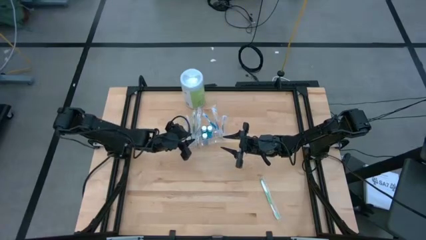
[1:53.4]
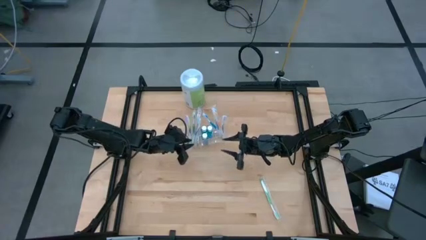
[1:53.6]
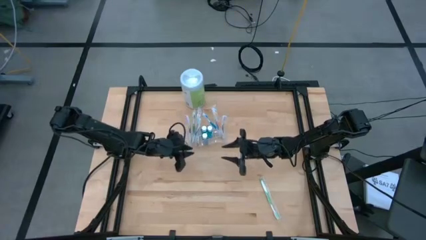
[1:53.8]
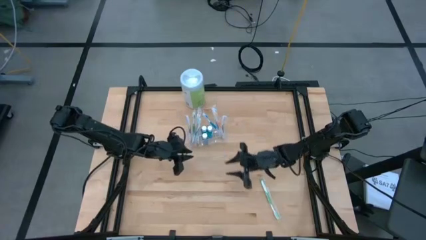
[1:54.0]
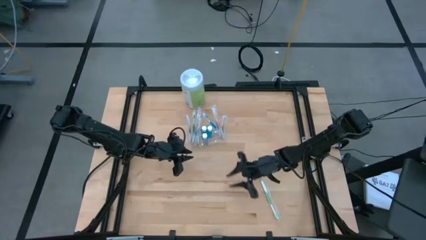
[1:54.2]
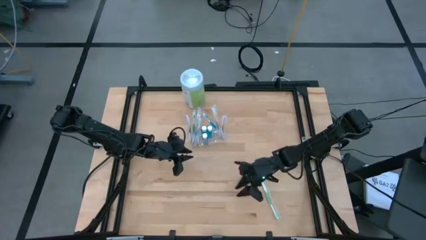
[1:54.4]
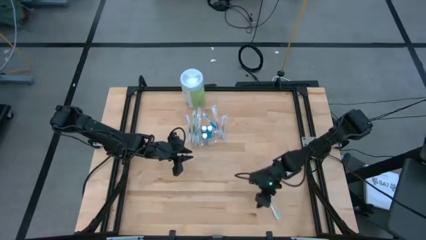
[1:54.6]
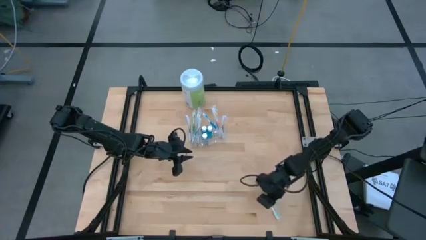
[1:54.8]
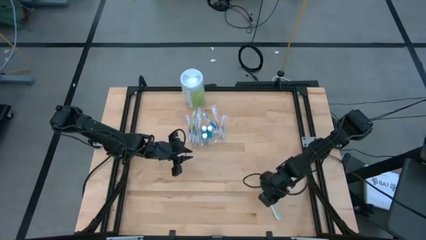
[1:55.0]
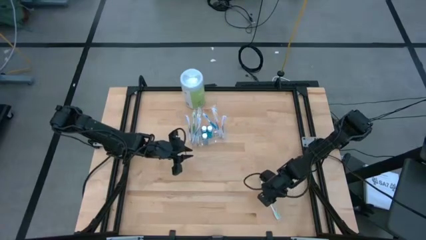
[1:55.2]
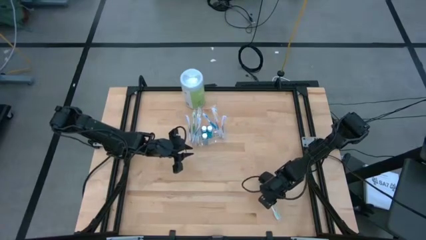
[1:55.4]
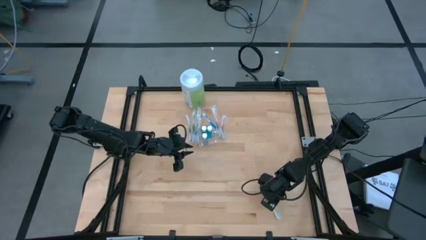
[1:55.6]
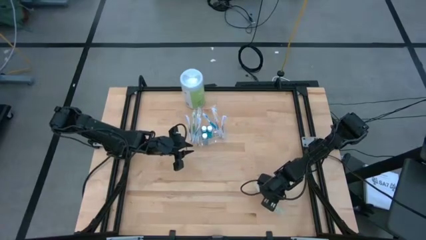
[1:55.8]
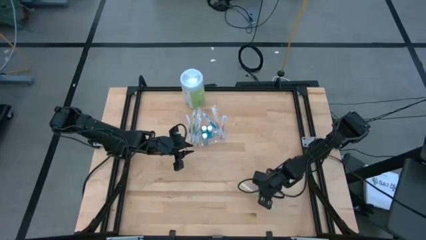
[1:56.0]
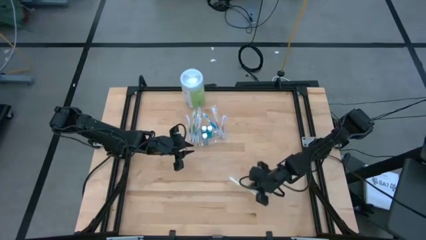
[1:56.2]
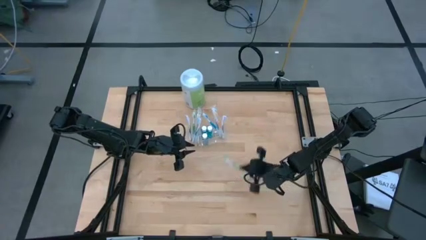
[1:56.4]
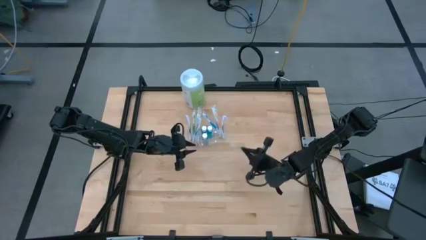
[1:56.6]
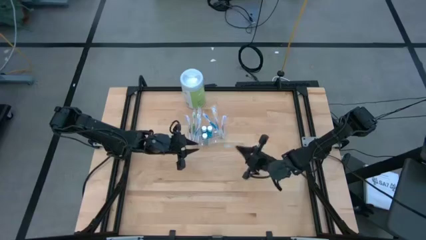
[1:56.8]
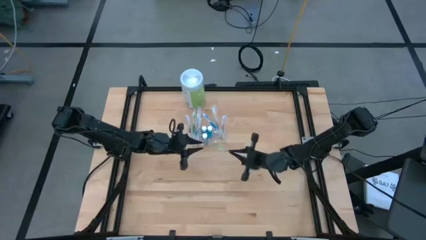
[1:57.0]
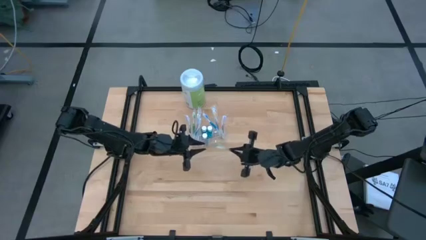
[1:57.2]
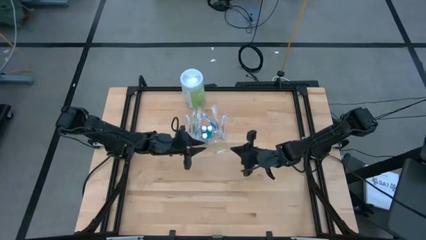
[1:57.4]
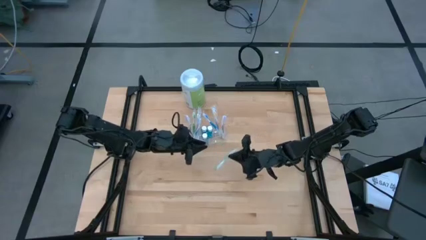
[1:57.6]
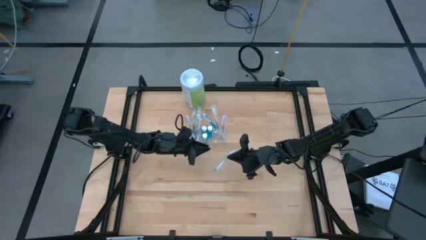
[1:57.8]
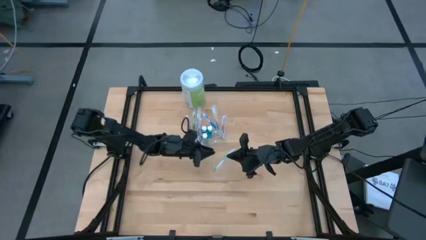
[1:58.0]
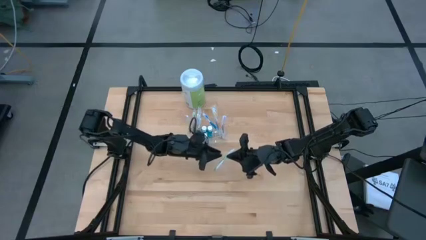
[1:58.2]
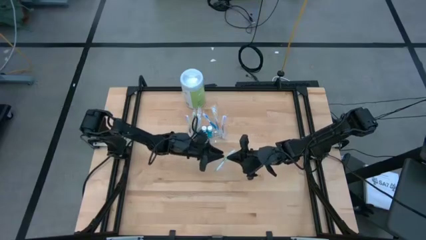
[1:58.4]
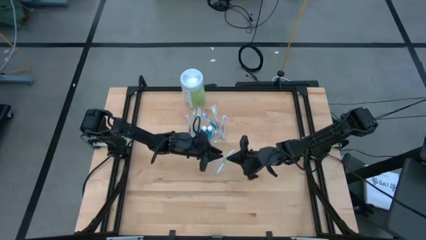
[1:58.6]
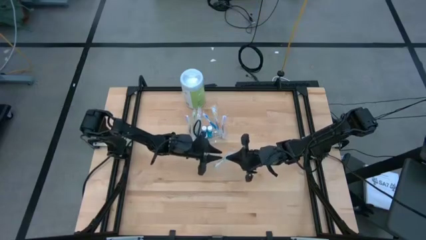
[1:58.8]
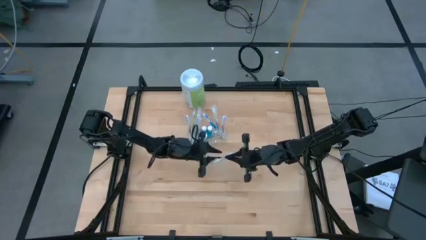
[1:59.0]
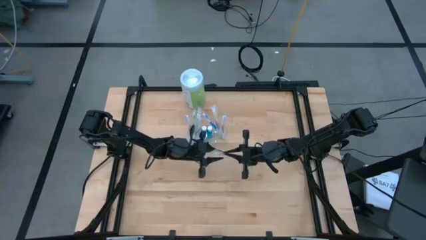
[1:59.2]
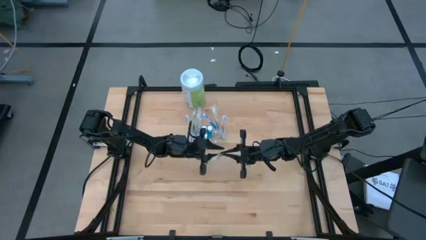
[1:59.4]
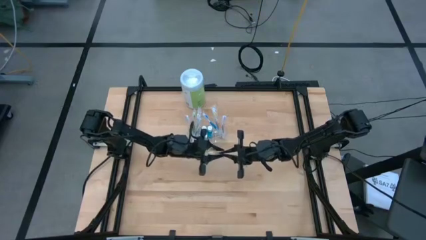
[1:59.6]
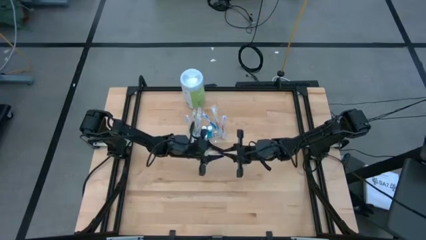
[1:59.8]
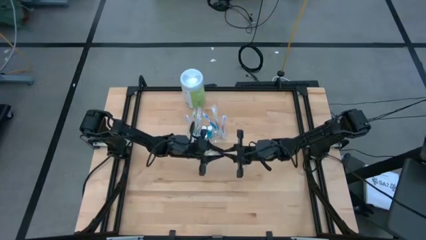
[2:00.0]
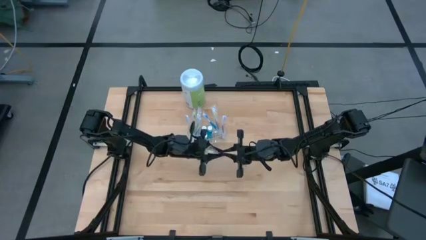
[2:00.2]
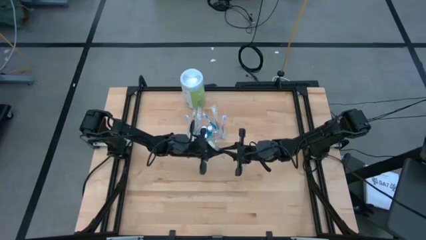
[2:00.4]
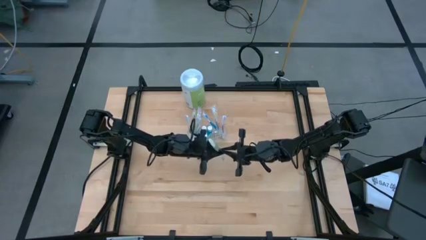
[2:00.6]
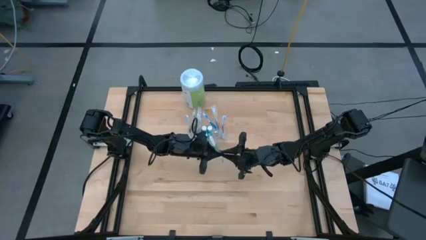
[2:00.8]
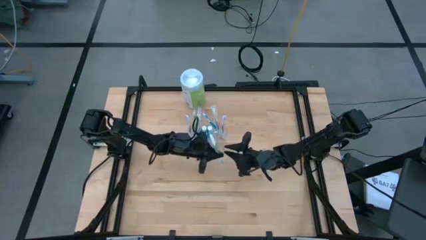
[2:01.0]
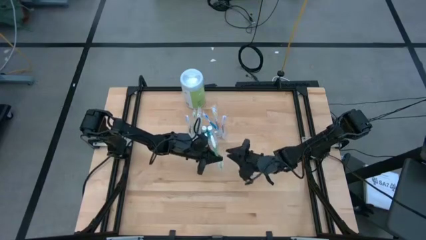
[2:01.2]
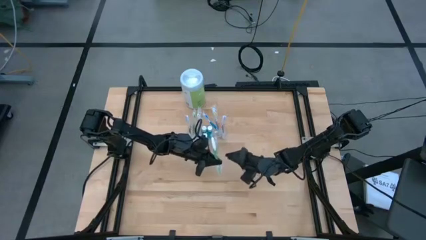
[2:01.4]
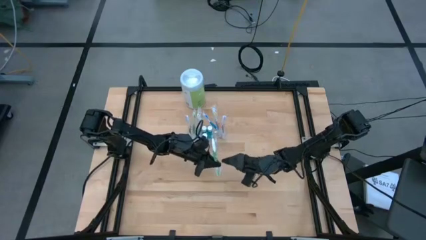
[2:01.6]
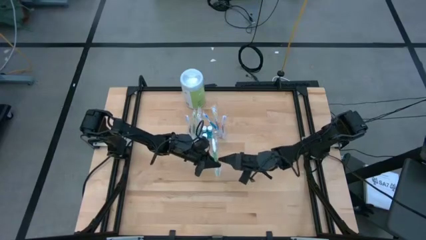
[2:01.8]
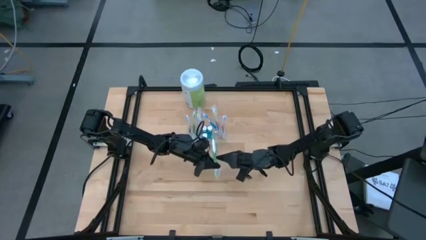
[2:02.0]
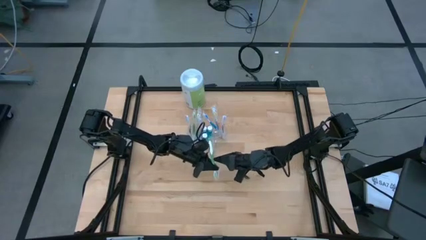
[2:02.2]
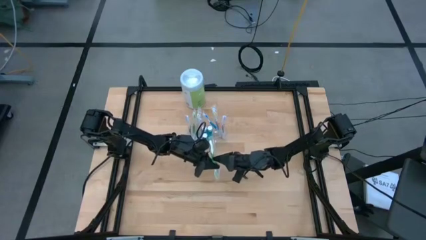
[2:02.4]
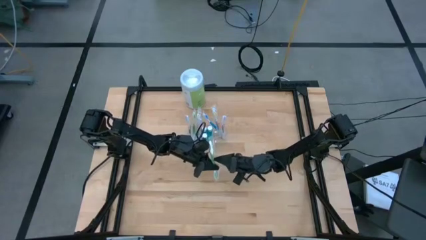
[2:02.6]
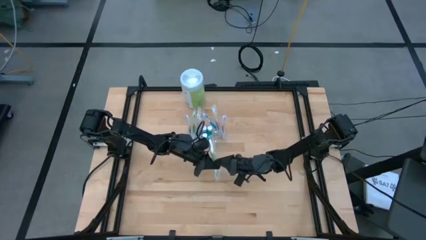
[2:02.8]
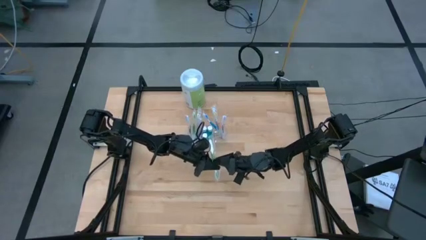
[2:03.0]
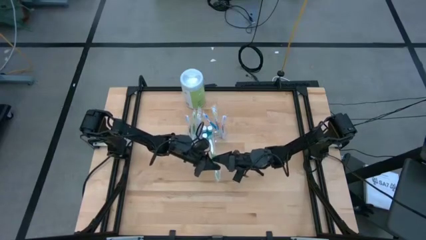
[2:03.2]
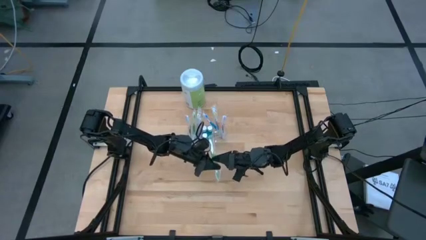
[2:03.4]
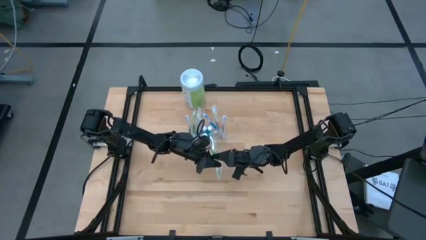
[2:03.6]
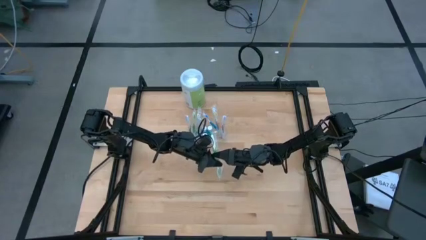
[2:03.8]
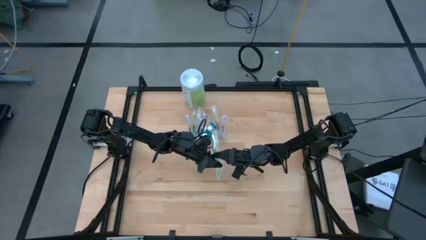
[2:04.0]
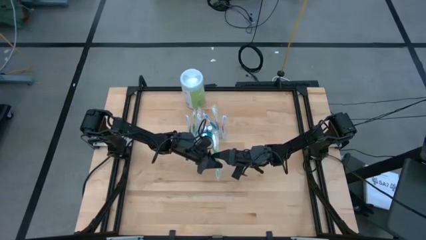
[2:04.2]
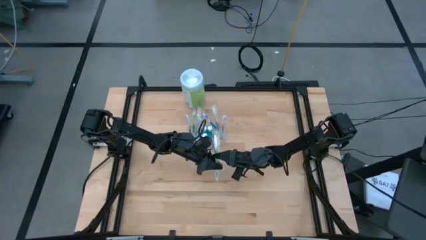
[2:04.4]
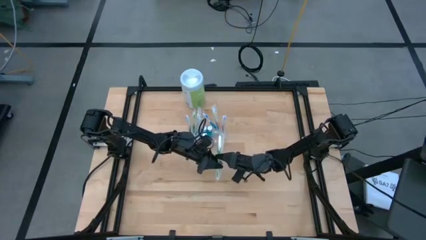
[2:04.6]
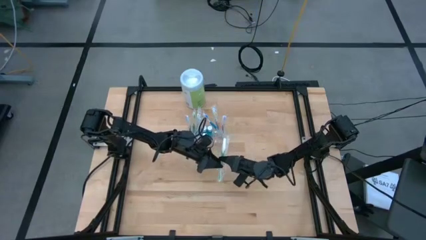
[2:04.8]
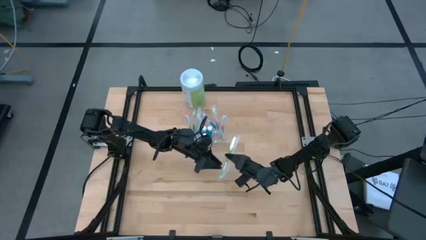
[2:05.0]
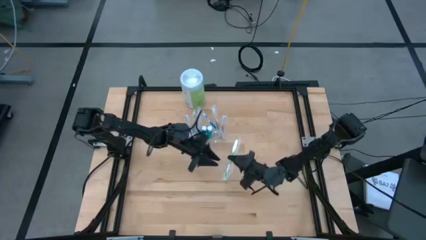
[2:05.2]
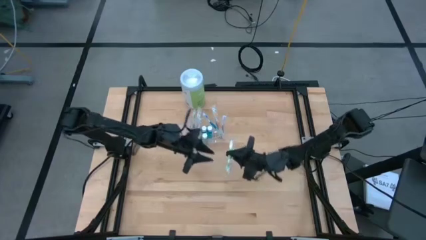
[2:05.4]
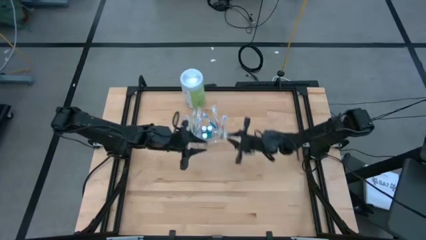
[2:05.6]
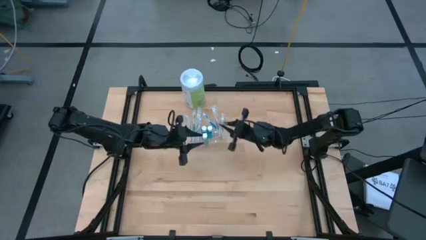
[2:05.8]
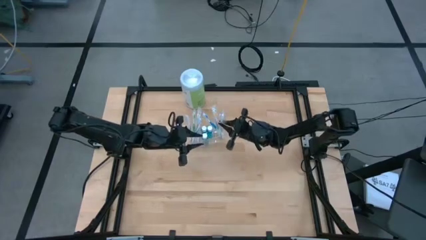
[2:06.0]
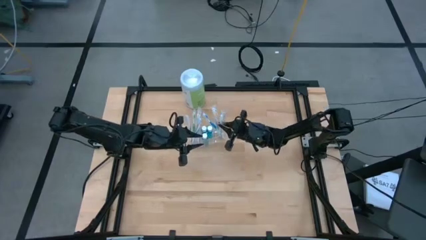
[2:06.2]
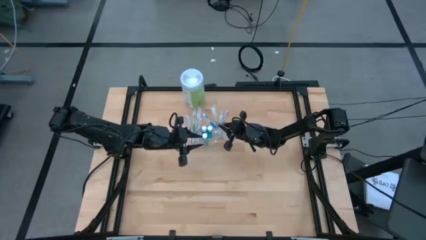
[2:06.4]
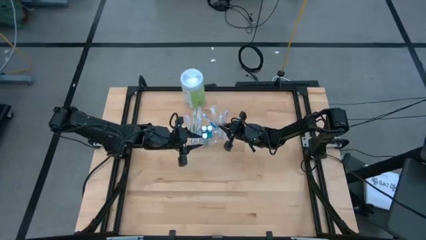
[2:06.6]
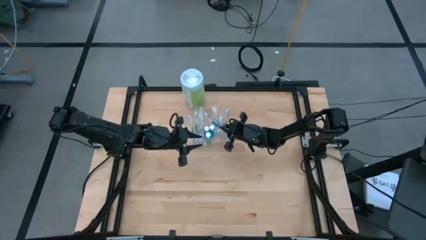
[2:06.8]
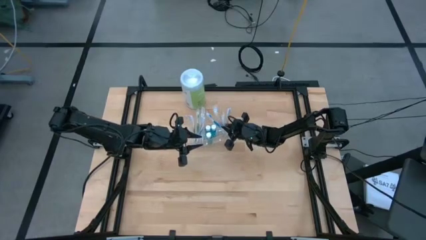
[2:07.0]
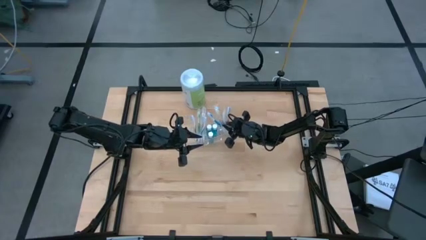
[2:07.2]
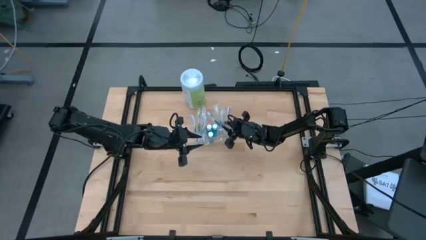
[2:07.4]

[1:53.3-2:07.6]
Task: Pick & Place toothbrushing station
Put the green toothbrush into the right side of the transparent organizer

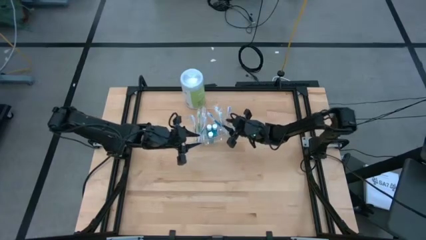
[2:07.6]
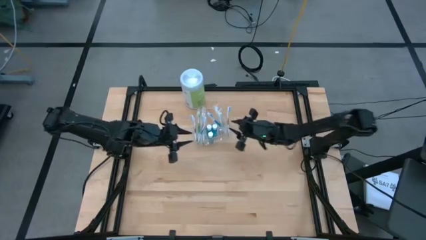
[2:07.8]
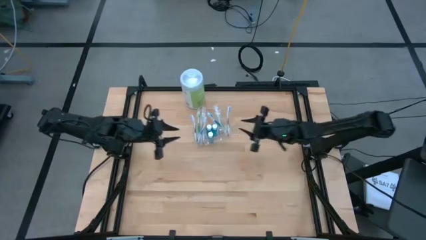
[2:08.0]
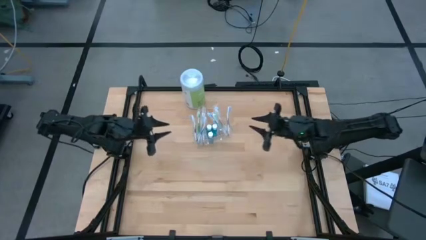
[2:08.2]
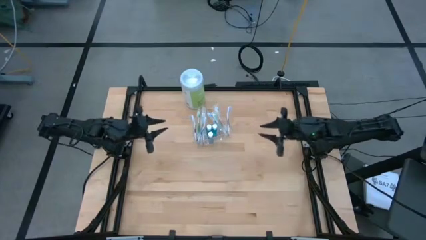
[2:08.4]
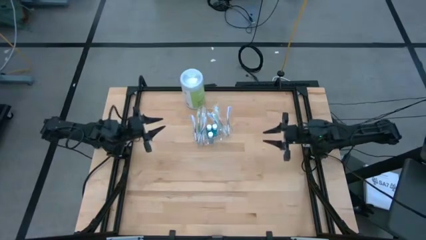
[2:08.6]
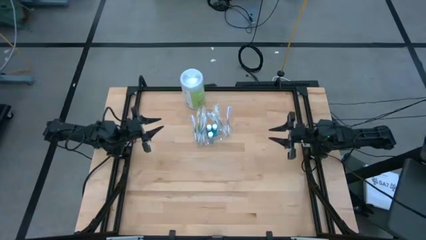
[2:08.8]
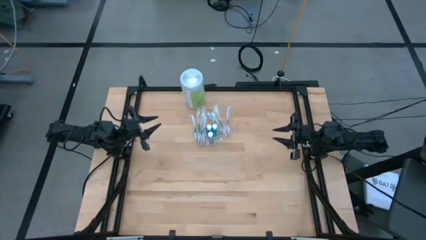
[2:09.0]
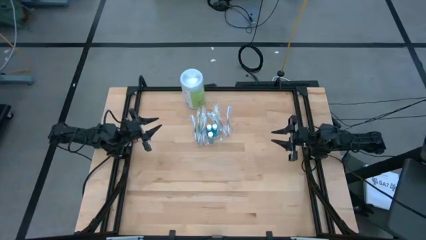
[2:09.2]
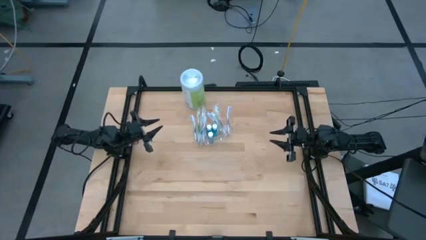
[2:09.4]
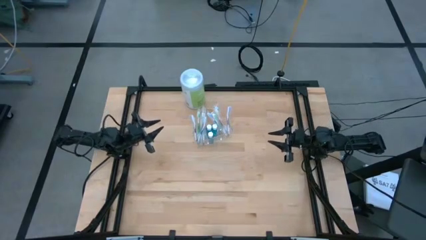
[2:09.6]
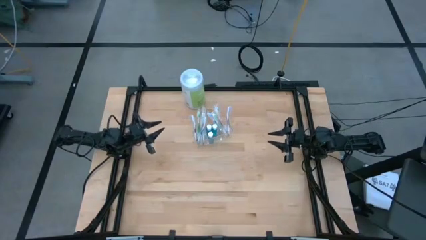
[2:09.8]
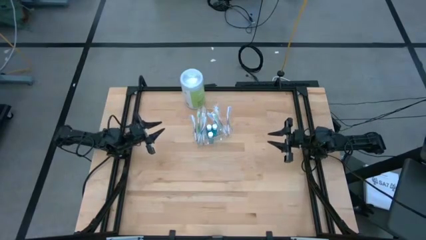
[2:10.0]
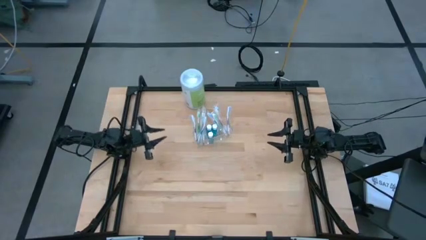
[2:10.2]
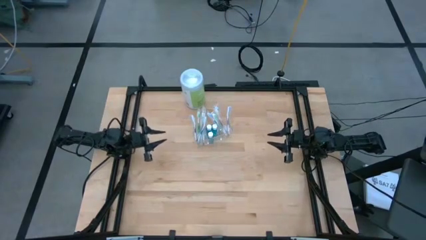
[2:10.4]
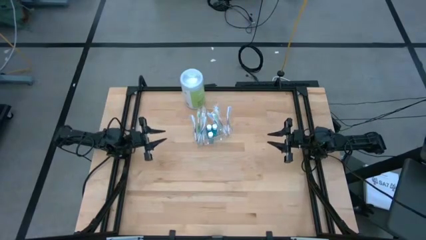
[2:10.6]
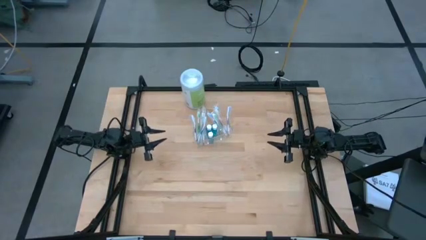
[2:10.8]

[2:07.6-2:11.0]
Return to Home Position
